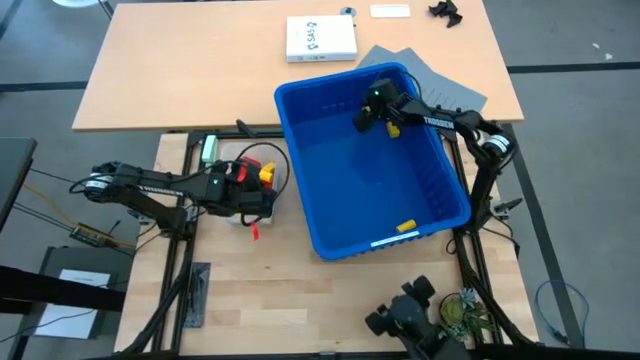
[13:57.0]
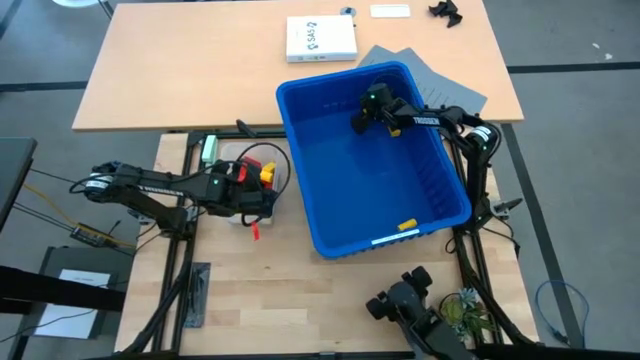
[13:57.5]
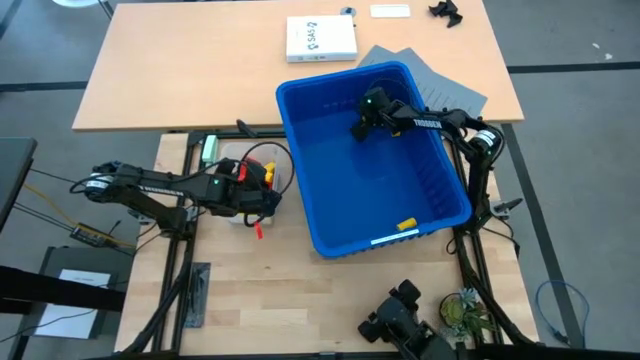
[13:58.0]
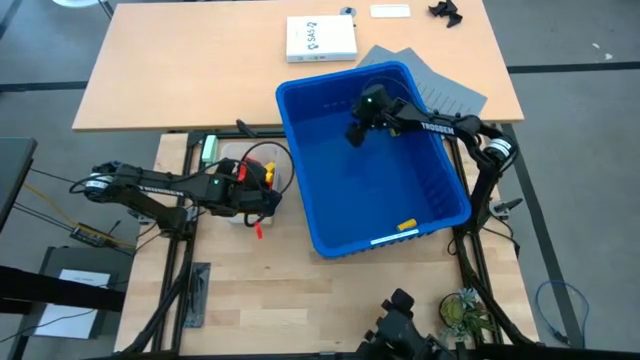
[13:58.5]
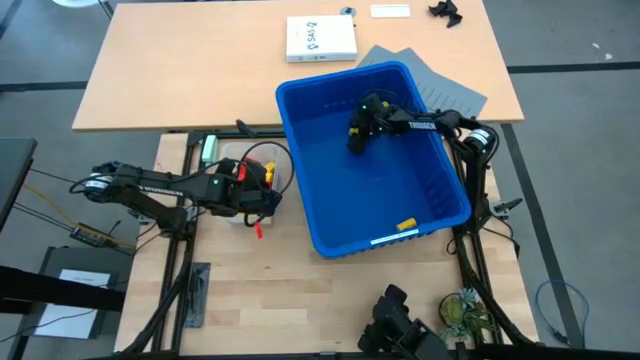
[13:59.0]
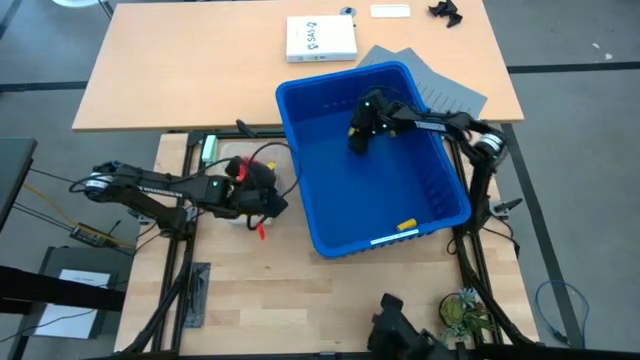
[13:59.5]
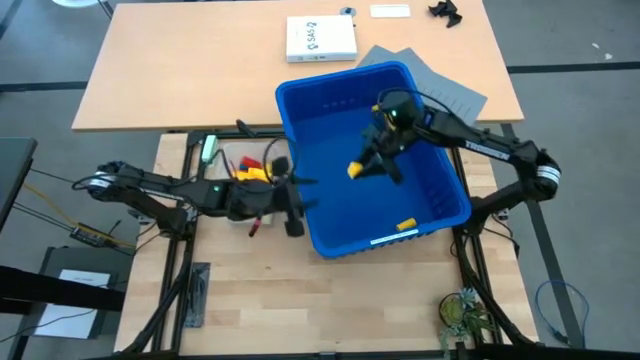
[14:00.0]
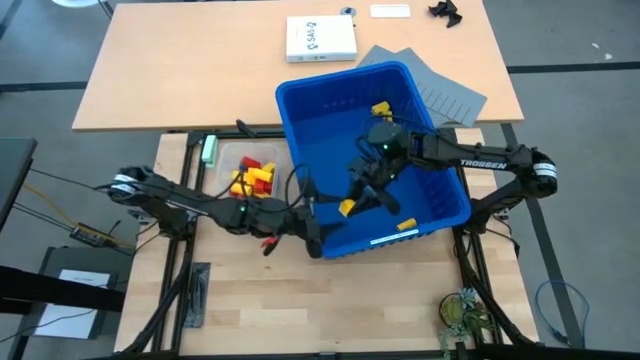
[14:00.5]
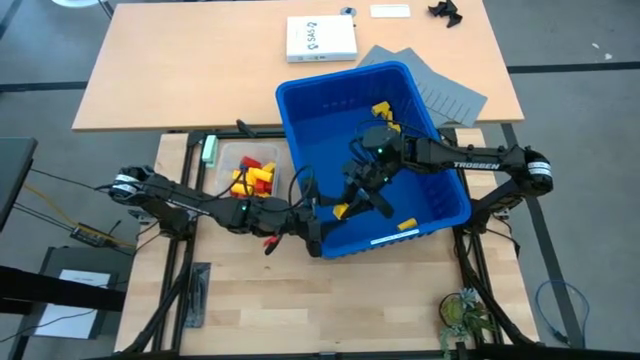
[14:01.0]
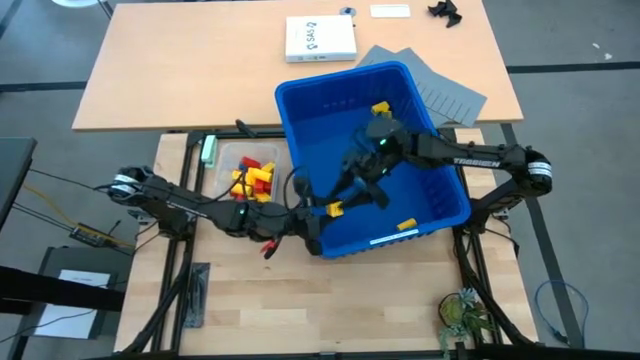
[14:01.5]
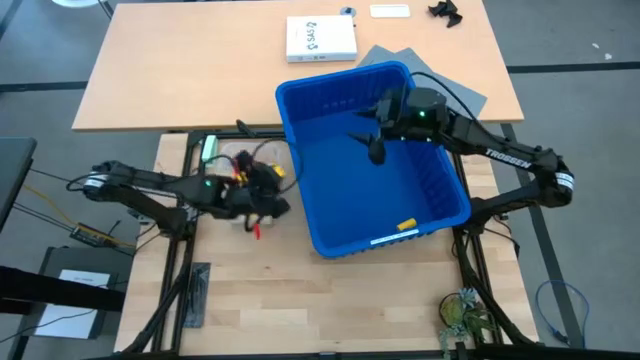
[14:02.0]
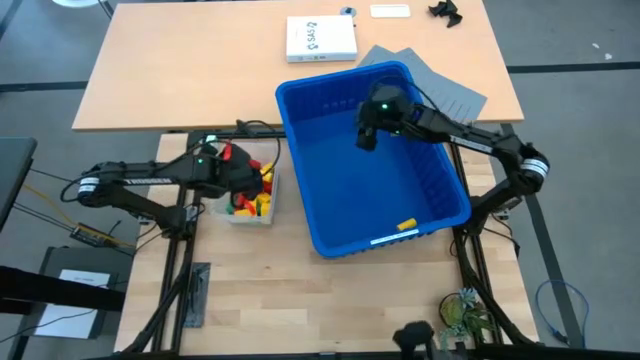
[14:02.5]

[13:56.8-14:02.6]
Task: Sort blocks
Put the yellow block into the transparent bin

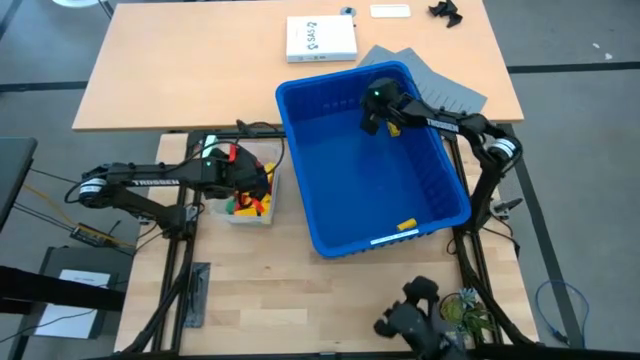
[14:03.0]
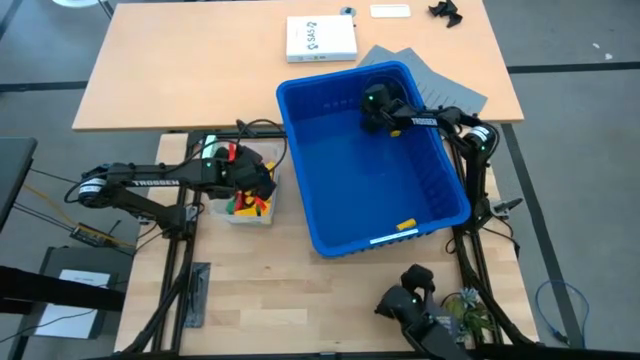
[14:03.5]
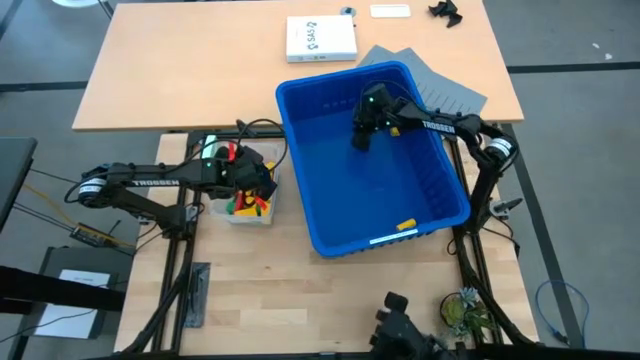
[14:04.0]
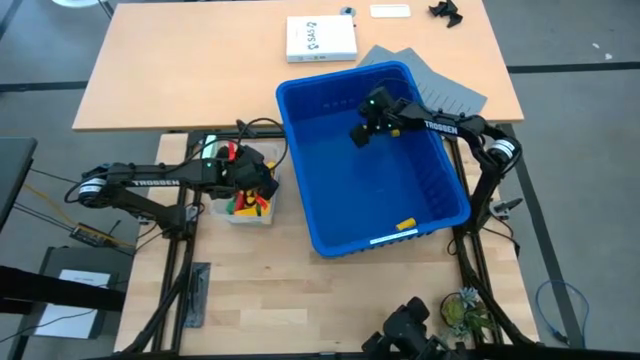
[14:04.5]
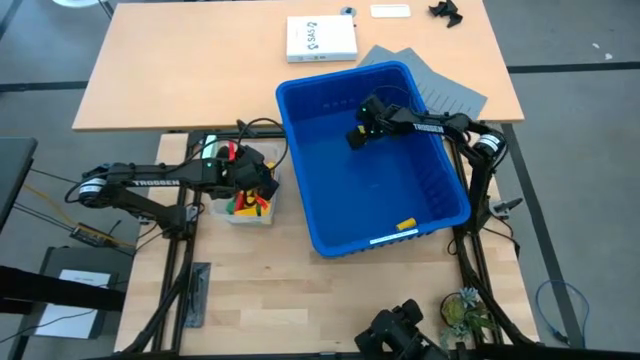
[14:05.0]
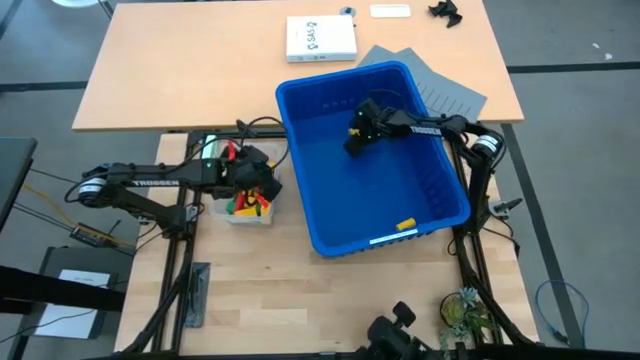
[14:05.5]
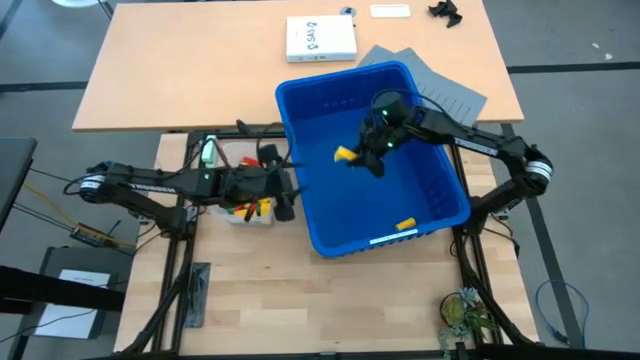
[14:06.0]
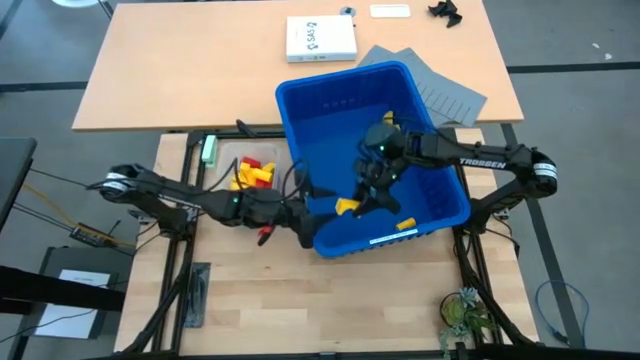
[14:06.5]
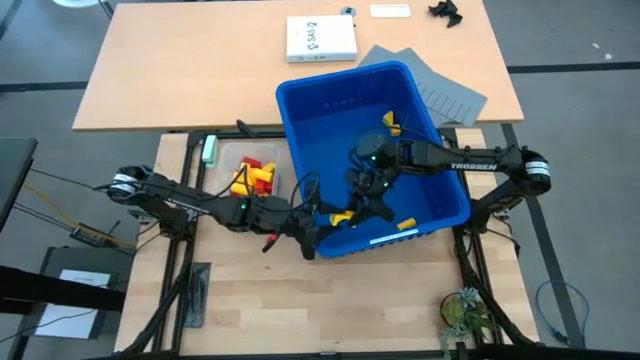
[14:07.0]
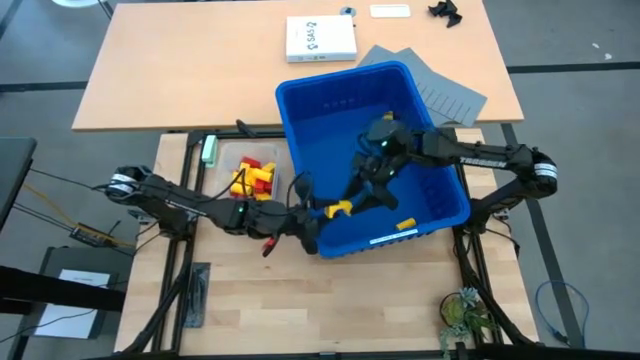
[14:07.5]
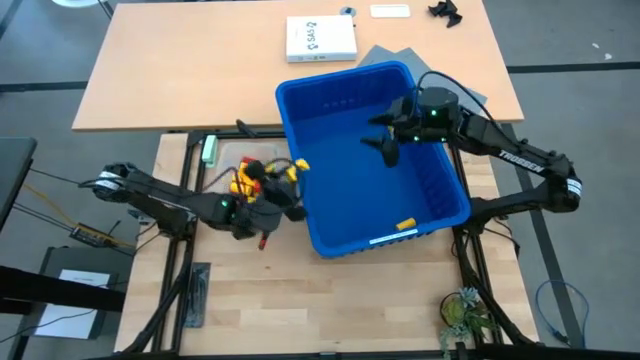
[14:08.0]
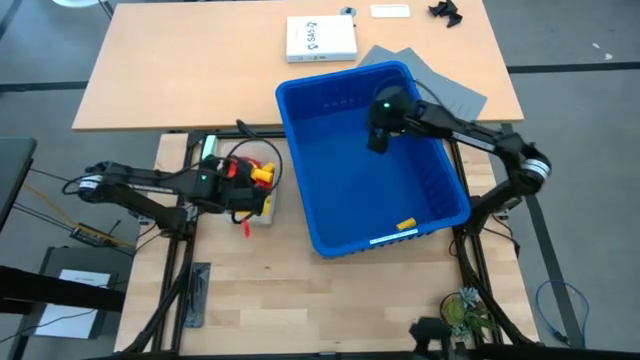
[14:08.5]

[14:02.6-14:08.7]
Put the yellow block into the transparent bin

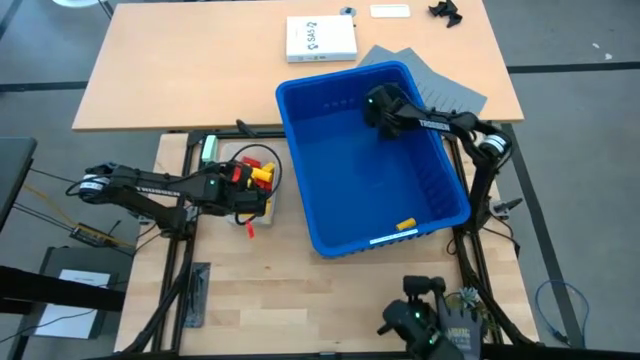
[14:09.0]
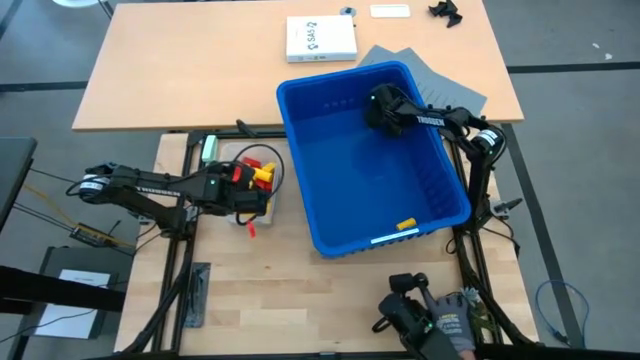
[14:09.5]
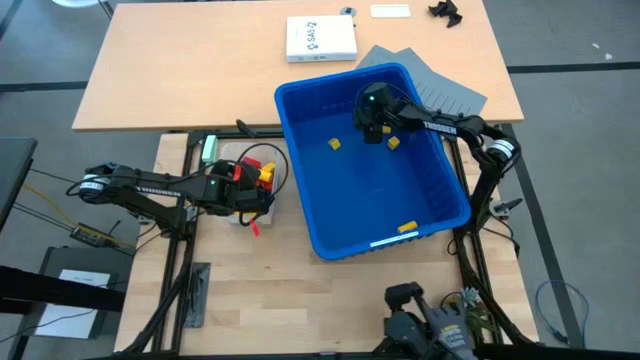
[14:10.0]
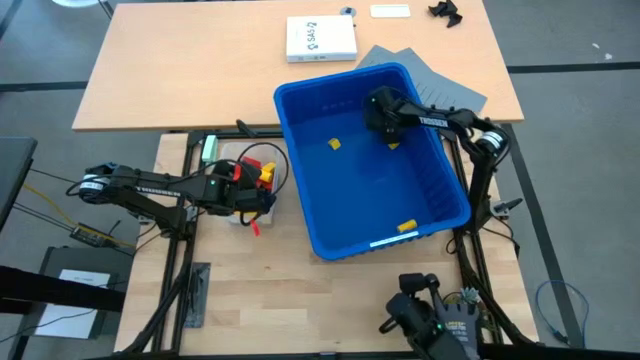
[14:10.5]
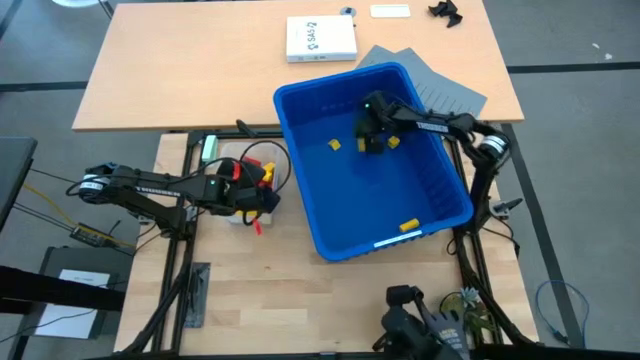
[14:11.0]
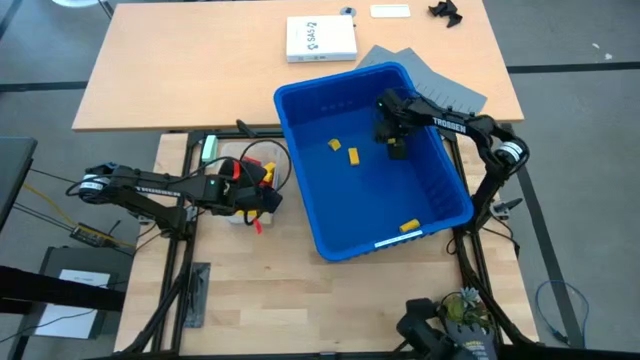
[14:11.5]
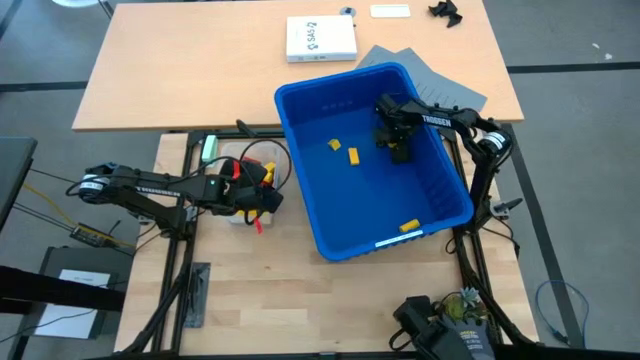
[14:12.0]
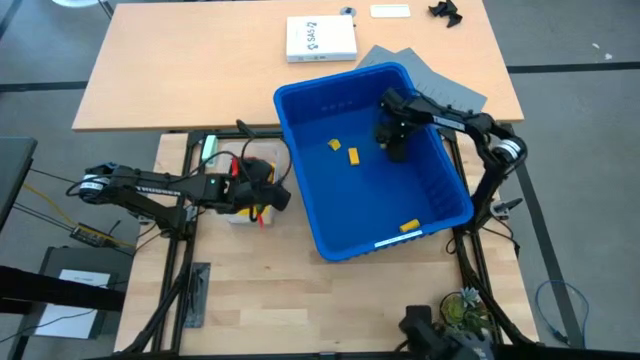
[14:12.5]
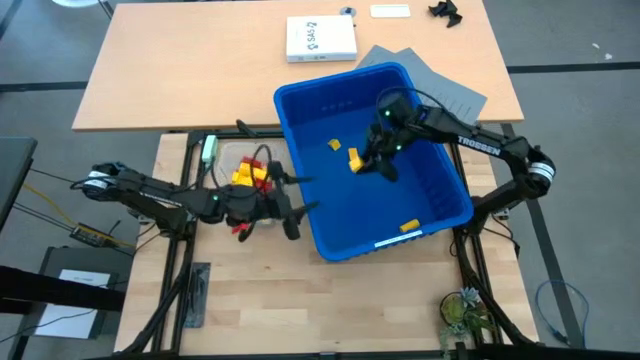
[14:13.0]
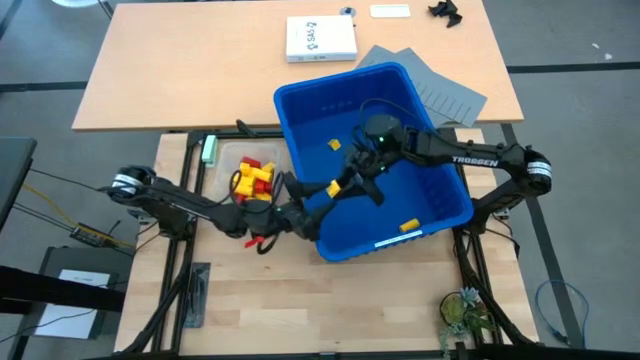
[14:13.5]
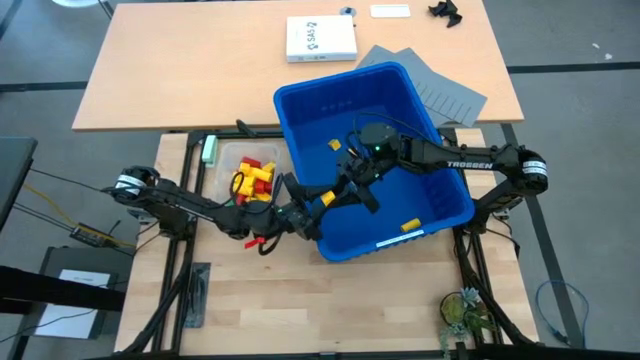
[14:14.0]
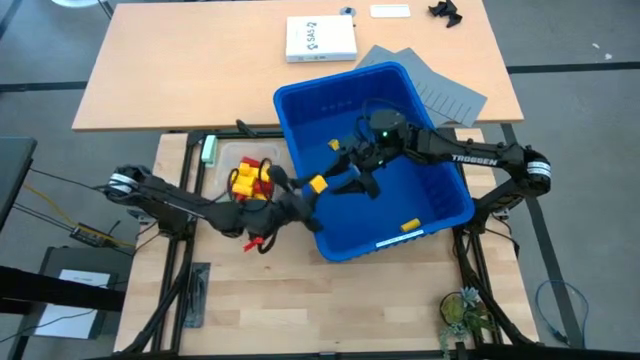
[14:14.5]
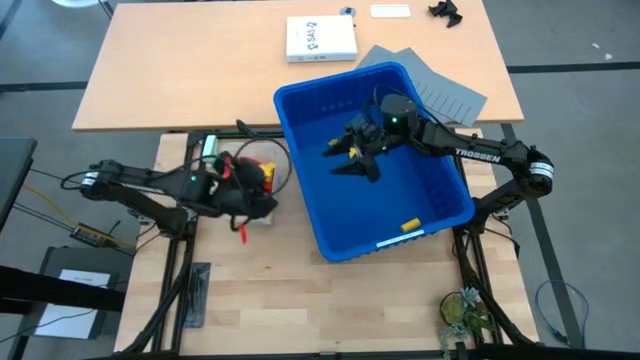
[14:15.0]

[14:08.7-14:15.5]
Put the yellow block into the transparent bin

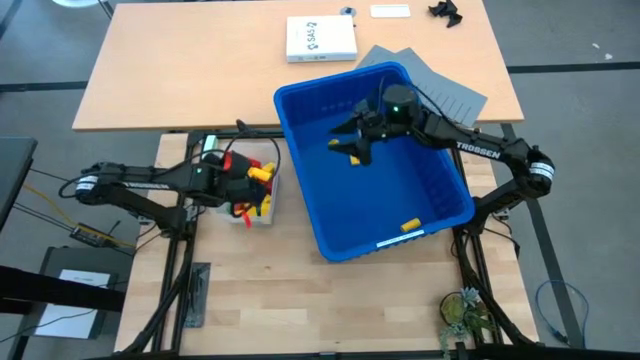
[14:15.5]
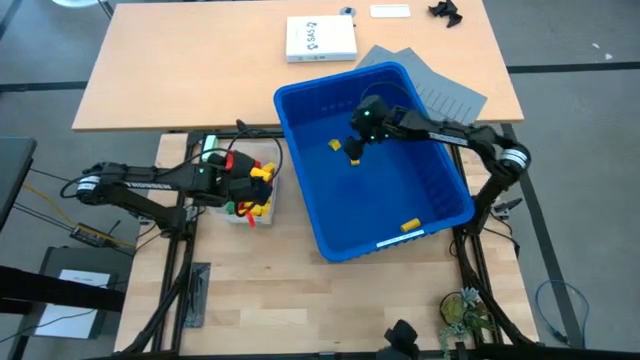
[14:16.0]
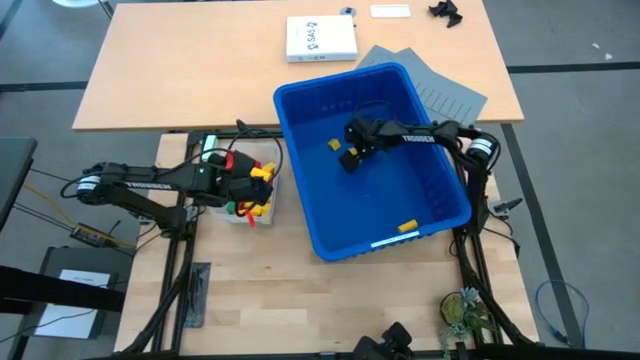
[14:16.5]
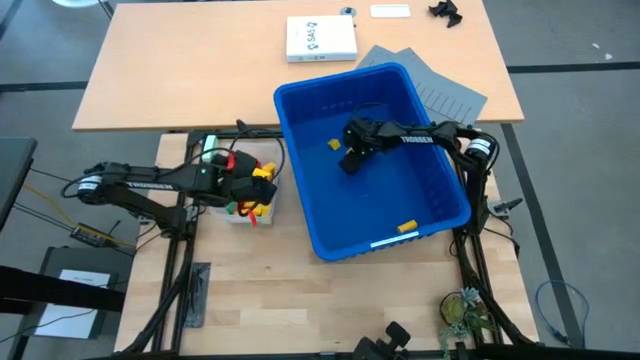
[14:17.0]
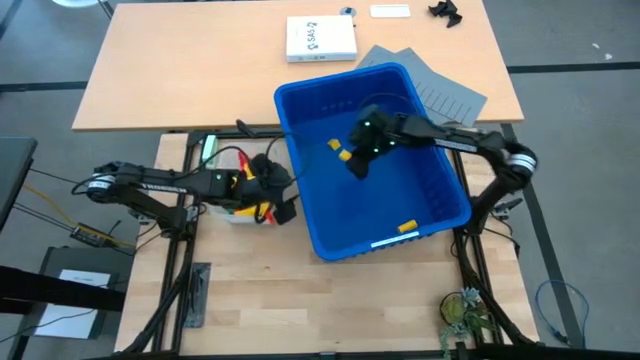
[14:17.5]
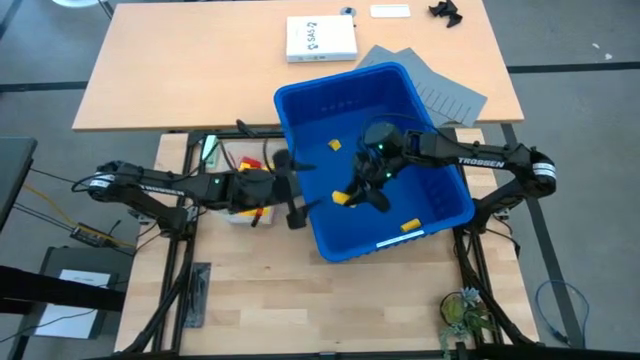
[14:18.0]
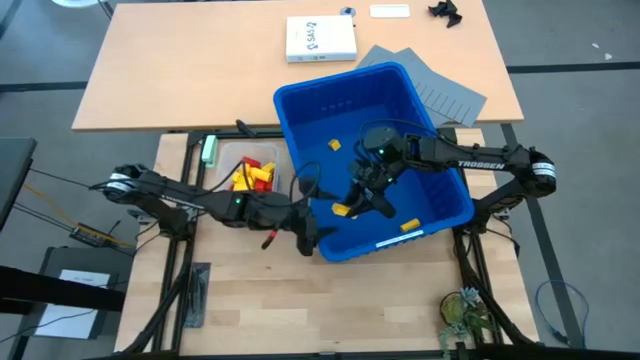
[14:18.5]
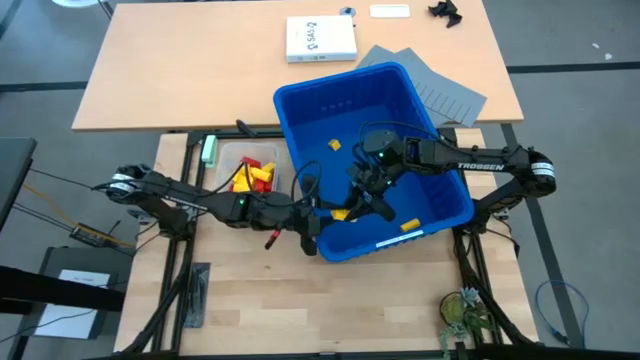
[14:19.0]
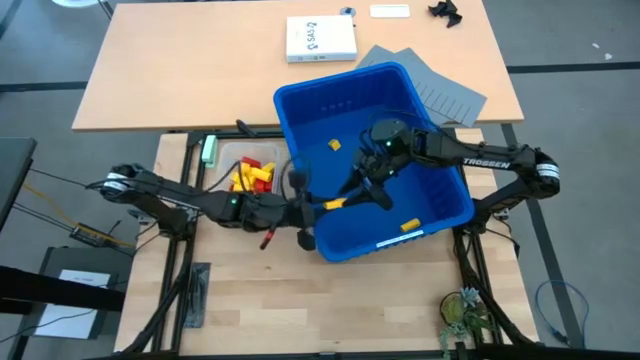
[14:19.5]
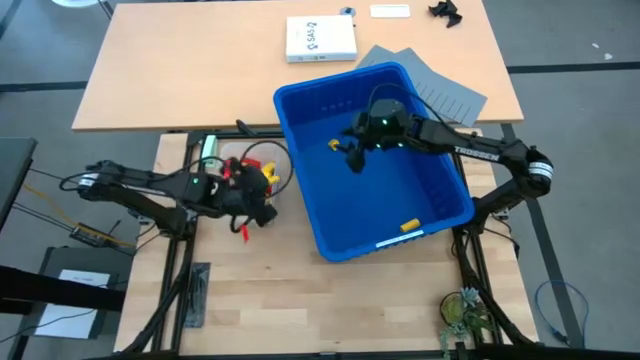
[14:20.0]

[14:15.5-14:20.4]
Put the yellow block into the transparent bin
